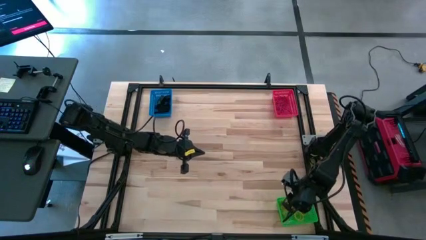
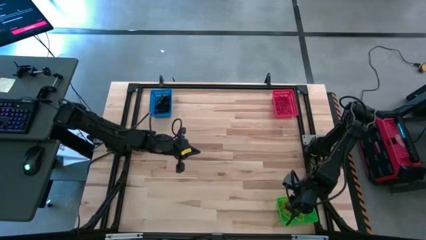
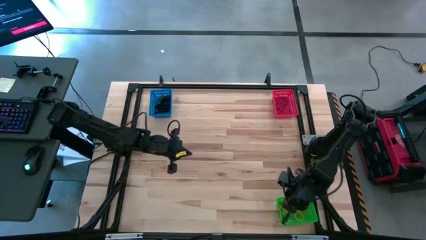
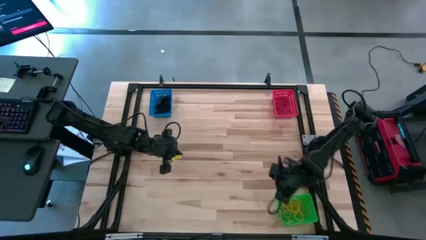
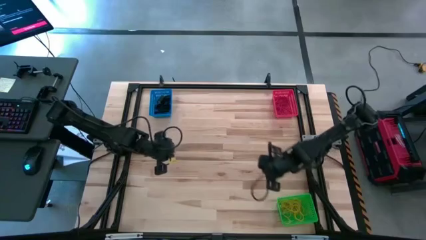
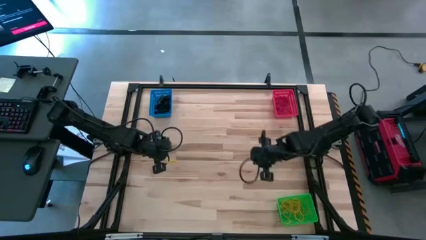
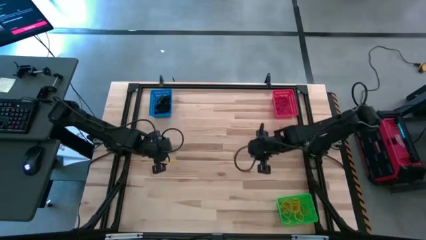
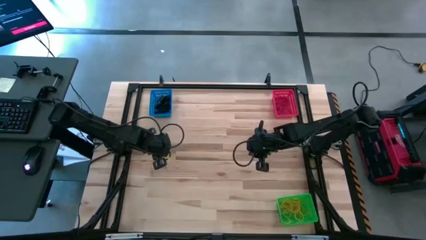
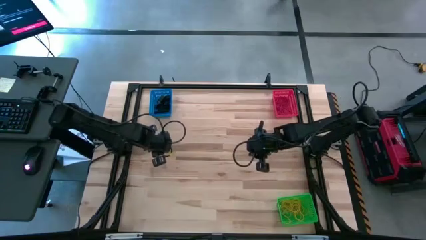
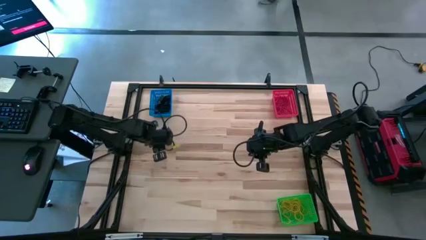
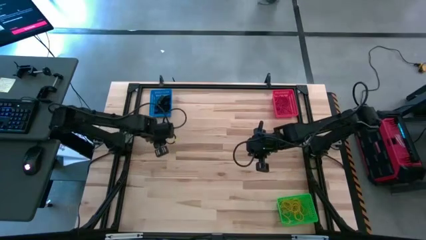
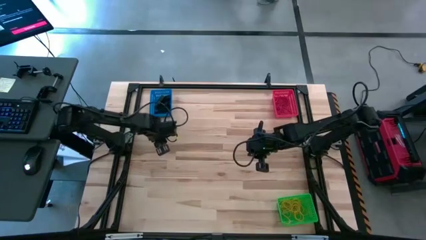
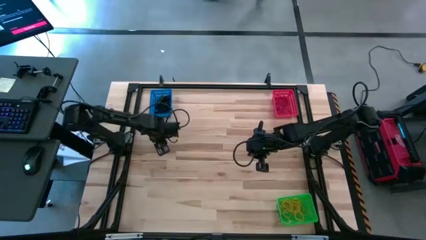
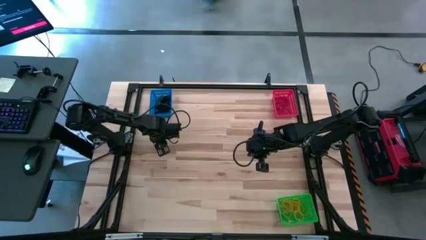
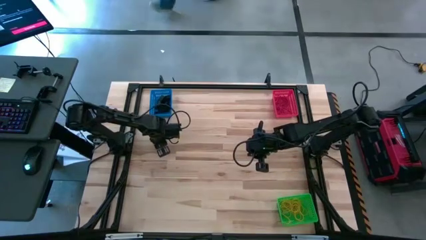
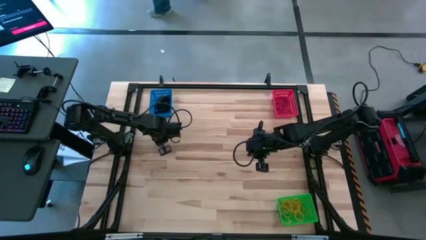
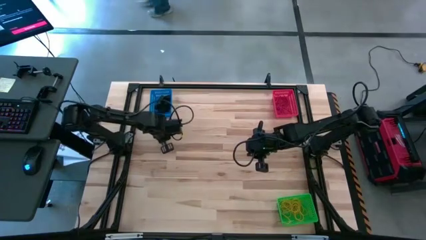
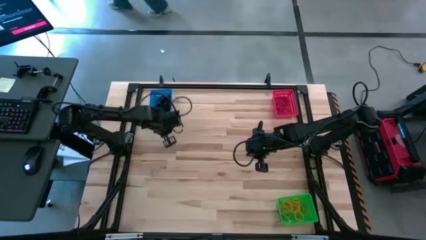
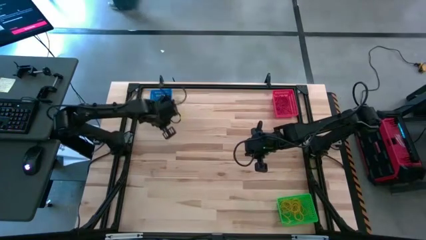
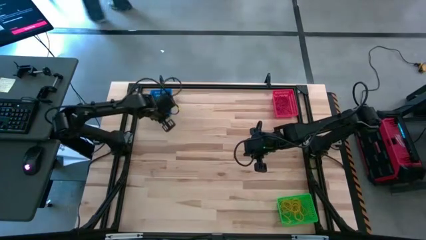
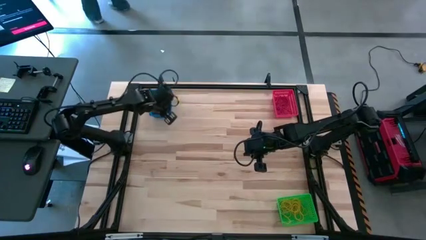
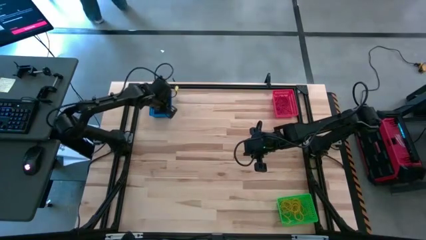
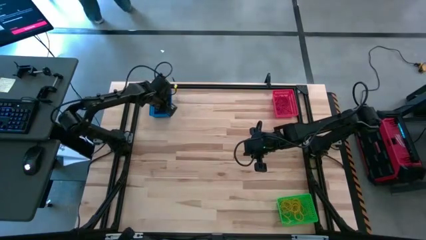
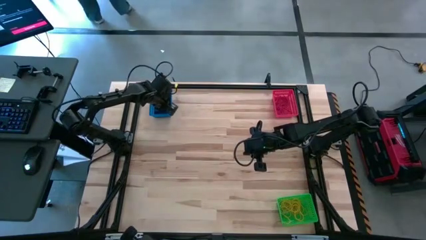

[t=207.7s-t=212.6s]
Task: Sort rubber bands into baskets
Put the black rubber band into blue bin

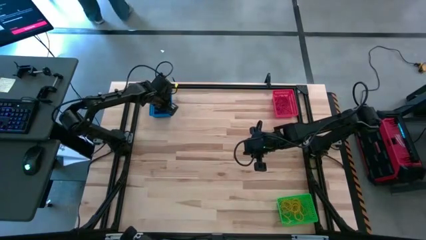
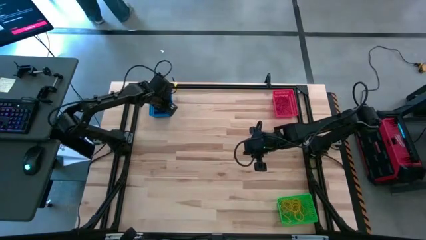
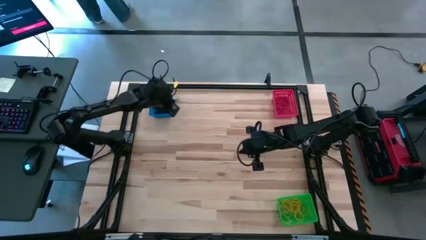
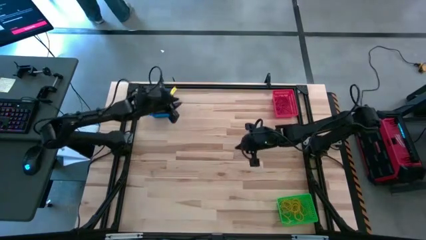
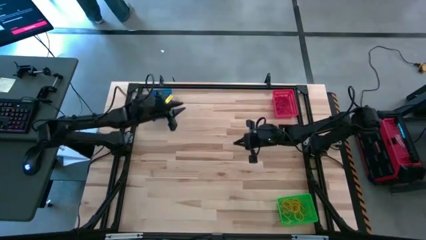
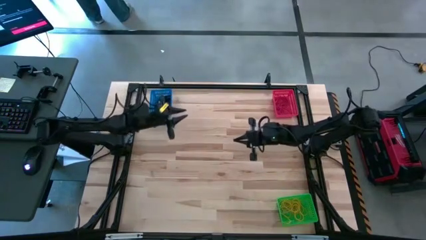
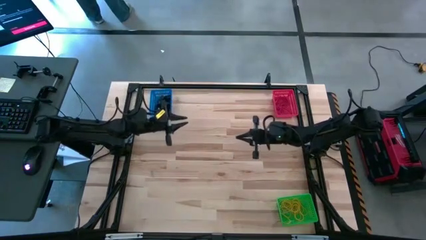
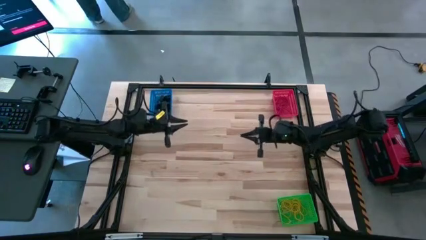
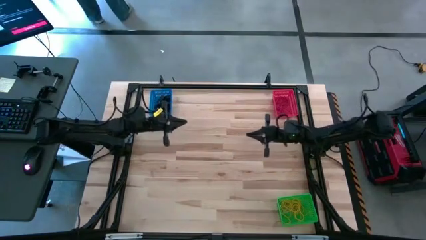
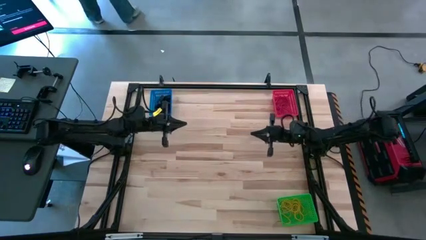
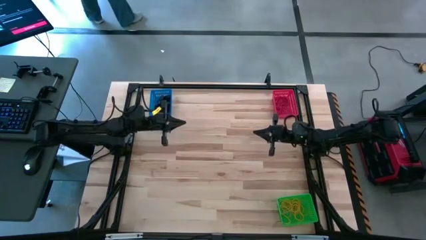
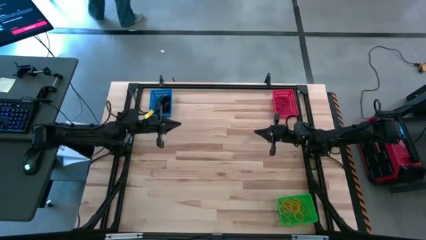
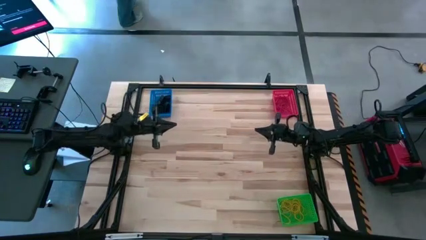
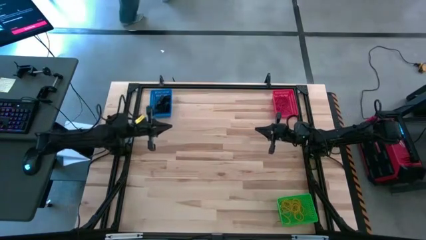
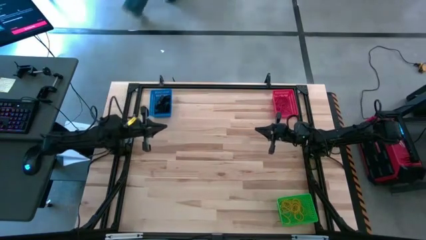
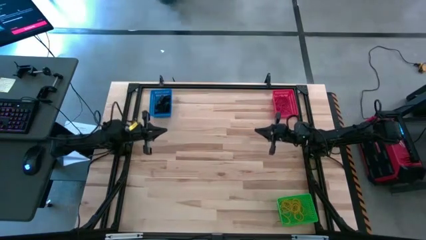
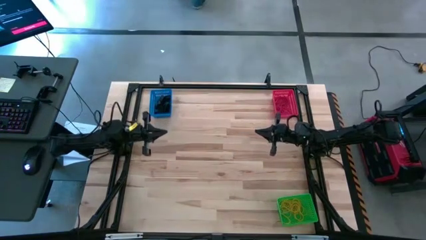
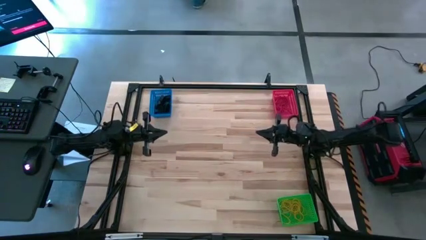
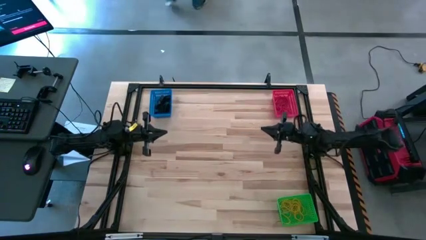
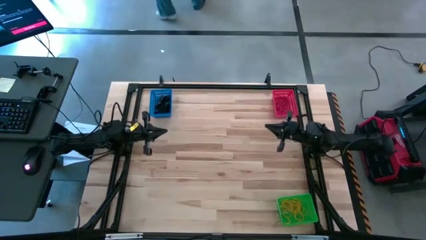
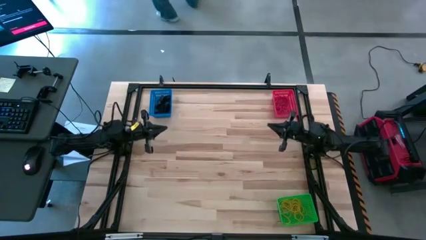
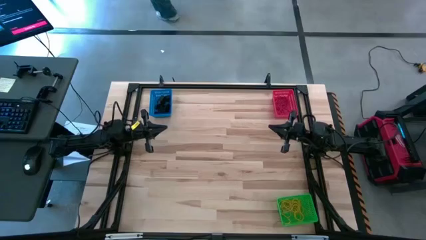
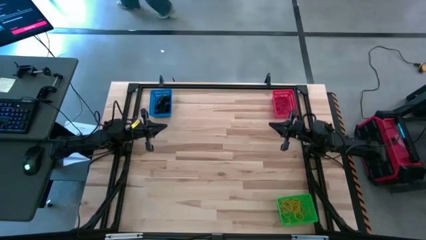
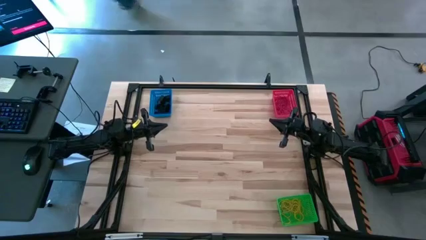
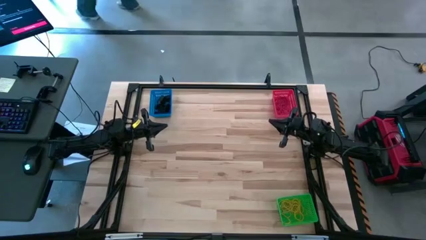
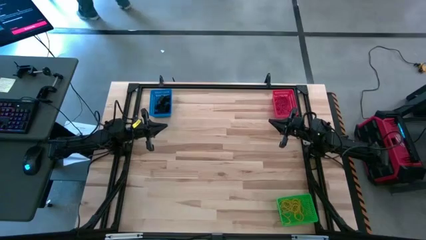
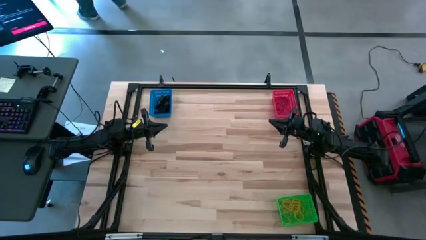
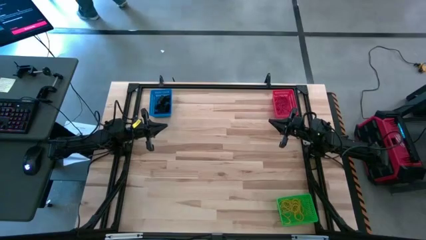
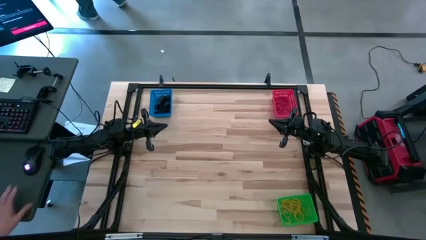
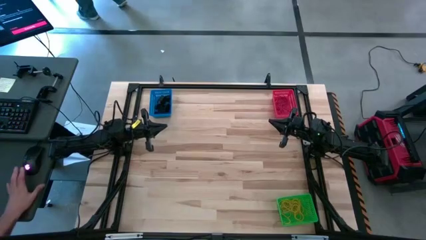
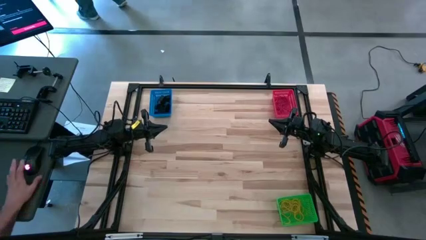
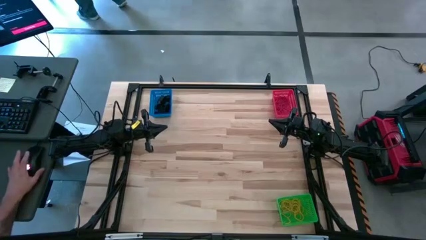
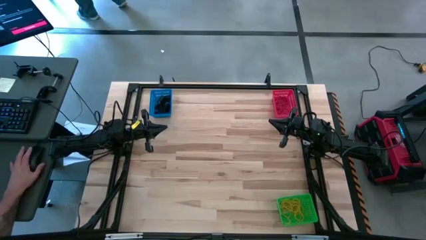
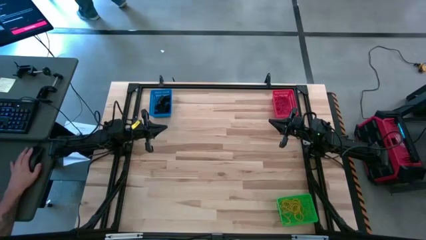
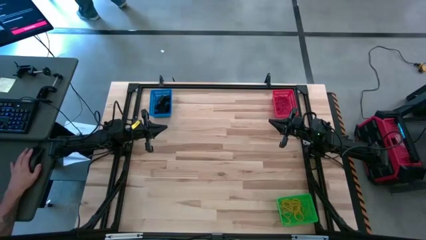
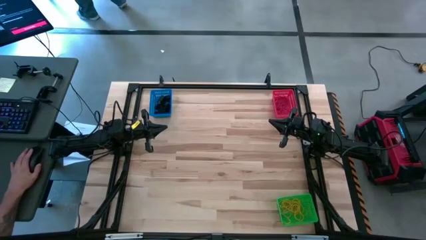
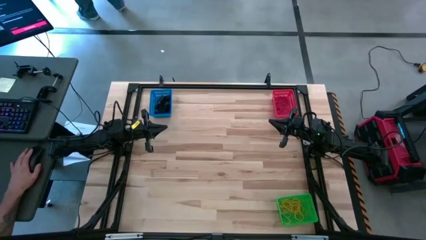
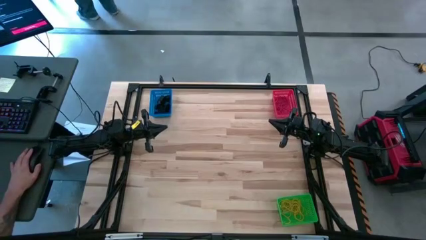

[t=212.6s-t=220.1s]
Return to Home Position
